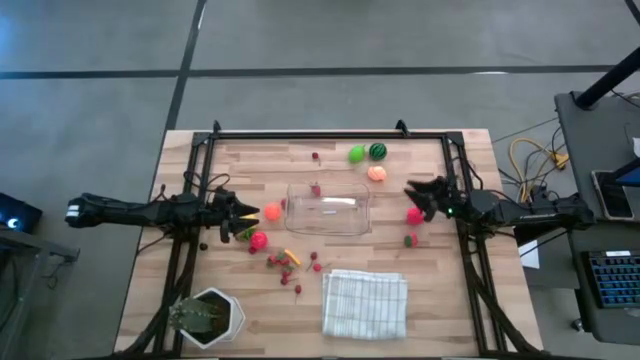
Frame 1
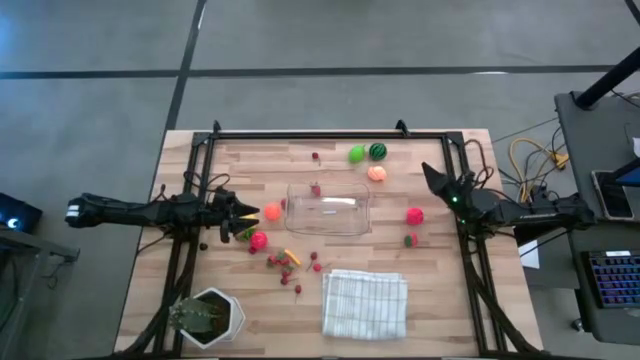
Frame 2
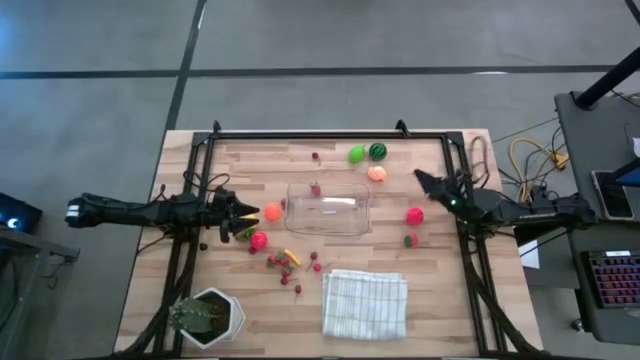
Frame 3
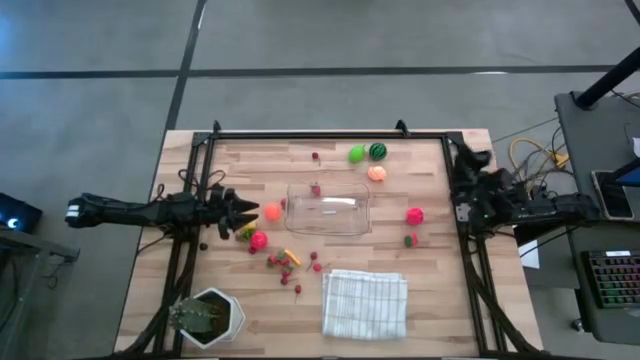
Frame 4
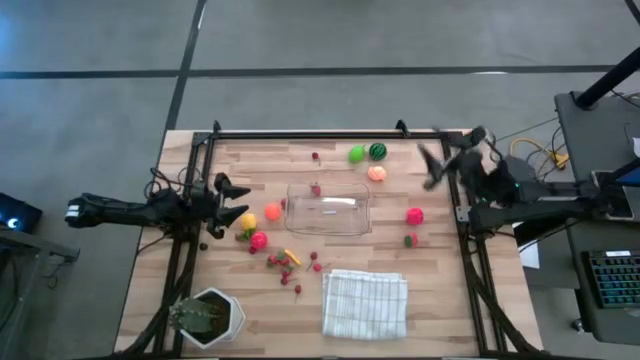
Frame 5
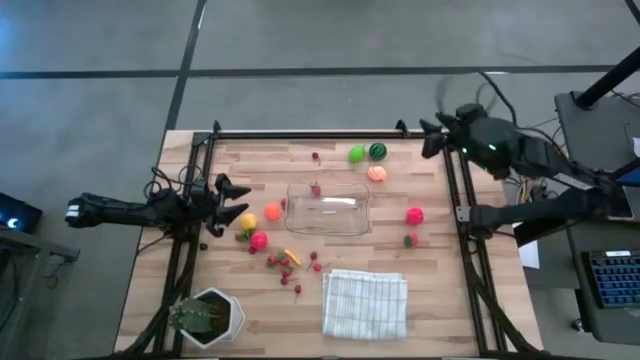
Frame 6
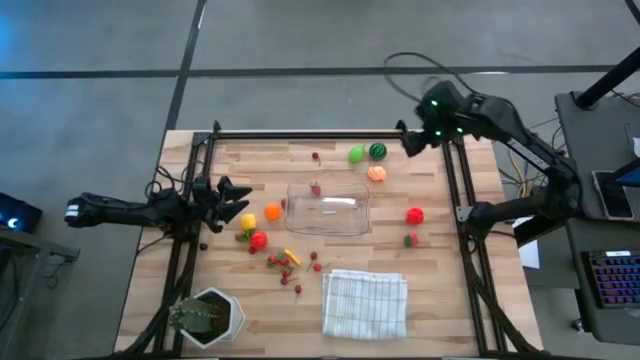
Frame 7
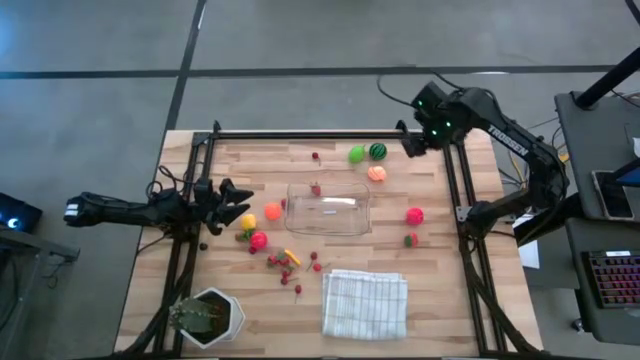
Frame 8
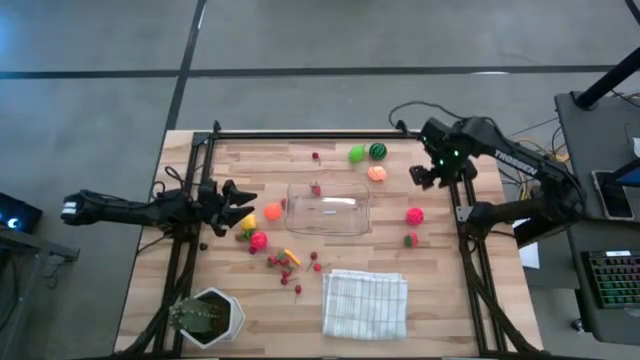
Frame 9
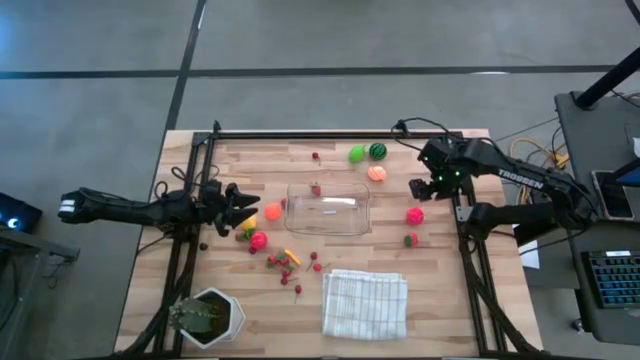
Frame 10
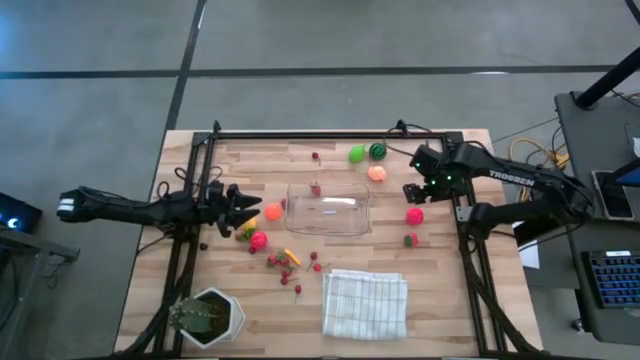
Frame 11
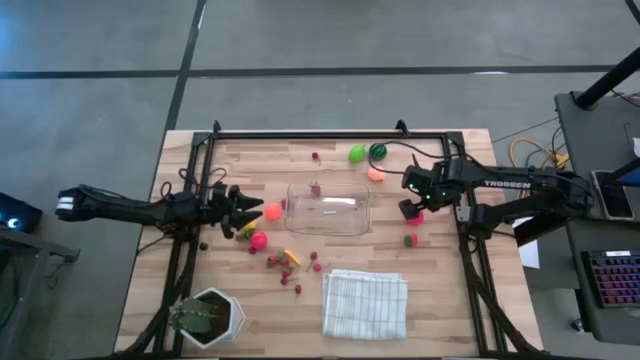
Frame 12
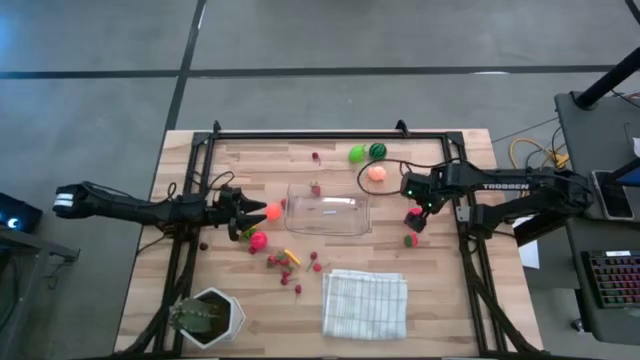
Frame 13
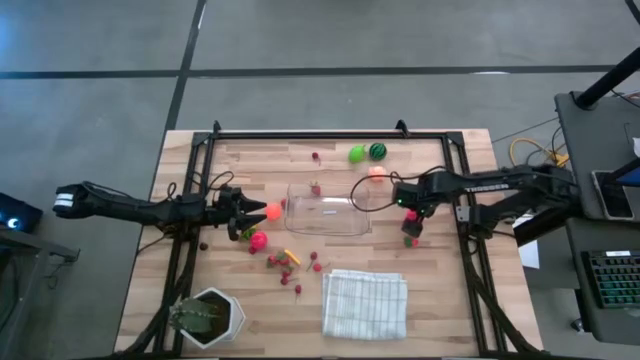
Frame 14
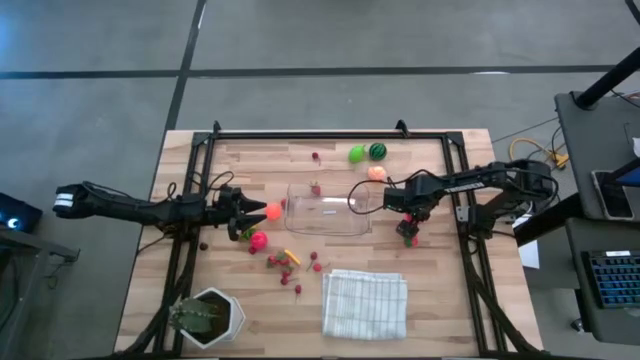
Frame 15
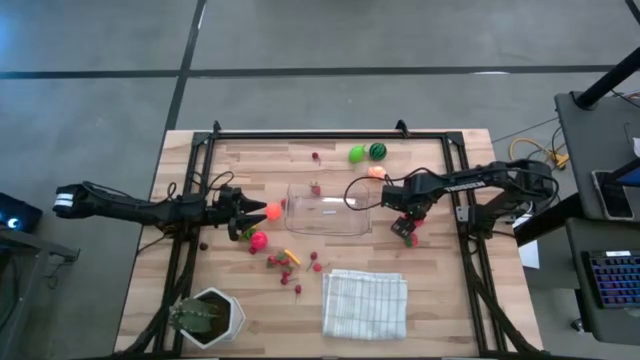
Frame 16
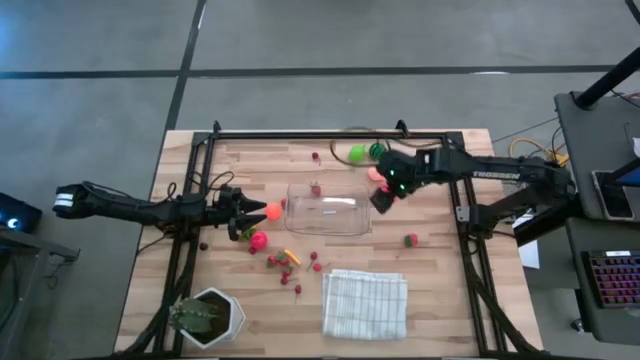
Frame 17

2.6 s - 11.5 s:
Task: Pick and placing Produce into tupperware
Put the red apple into the transparent bin

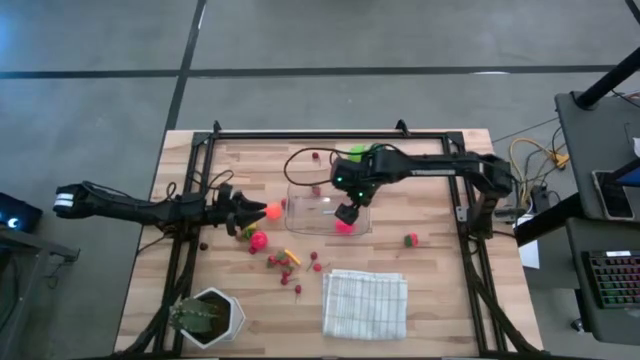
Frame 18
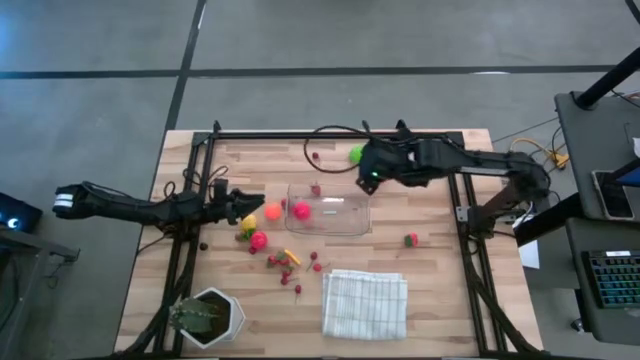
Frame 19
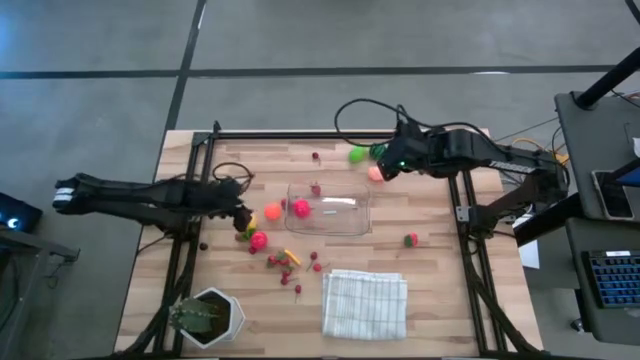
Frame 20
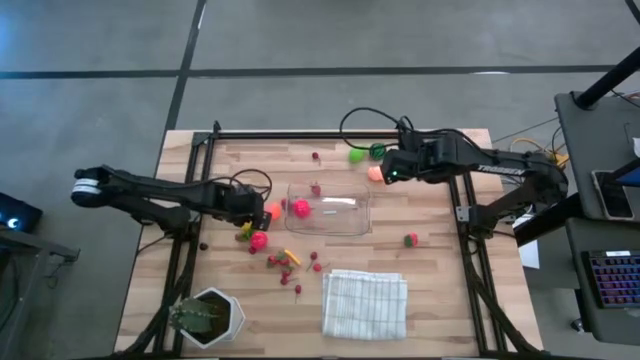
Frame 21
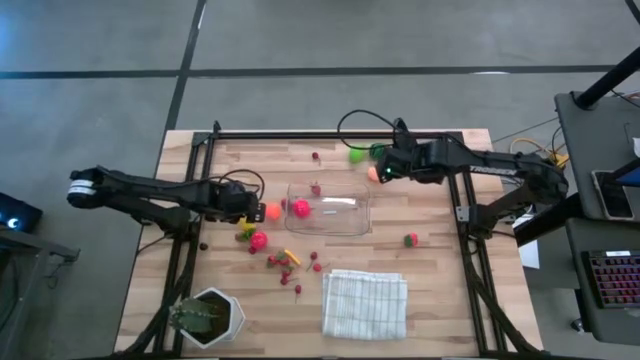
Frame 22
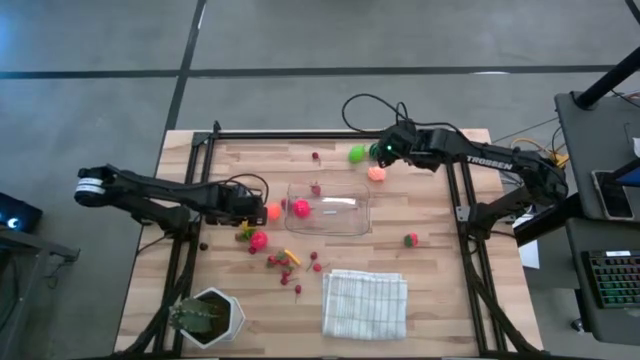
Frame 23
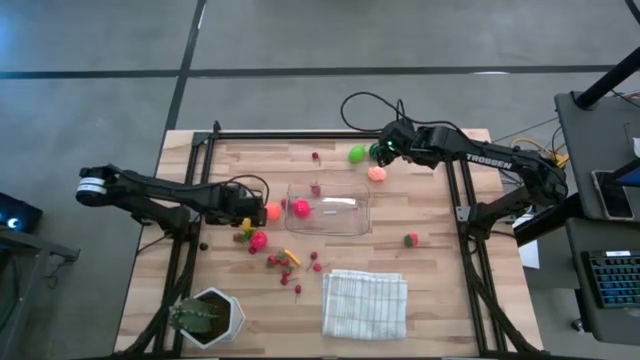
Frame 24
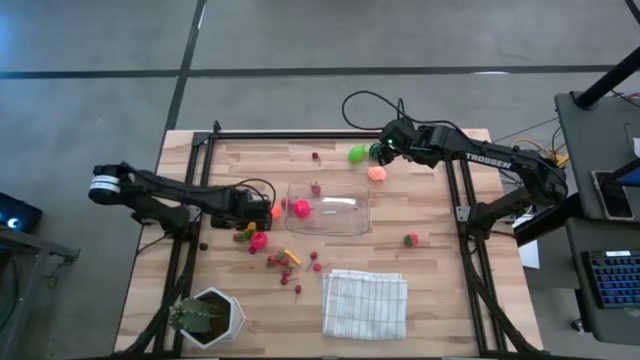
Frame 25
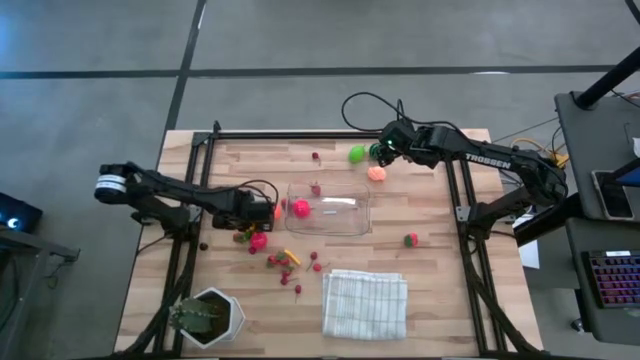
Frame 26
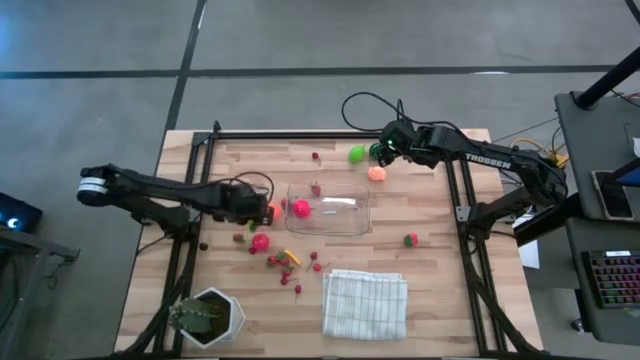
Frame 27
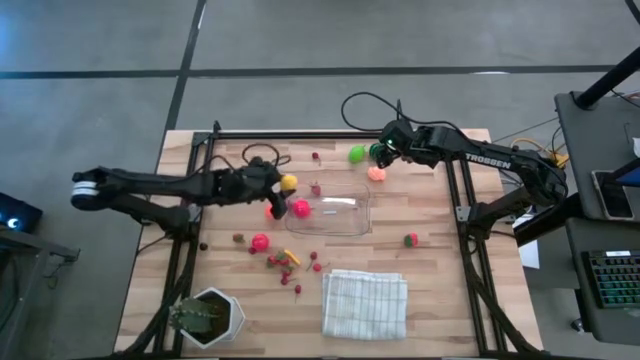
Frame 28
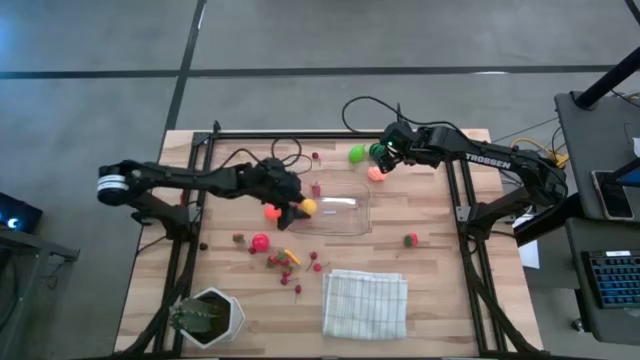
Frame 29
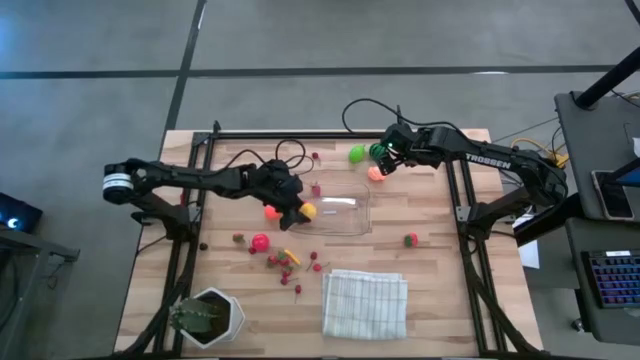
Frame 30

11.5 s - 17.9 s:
Put the yellow pineapple into the transparent bin

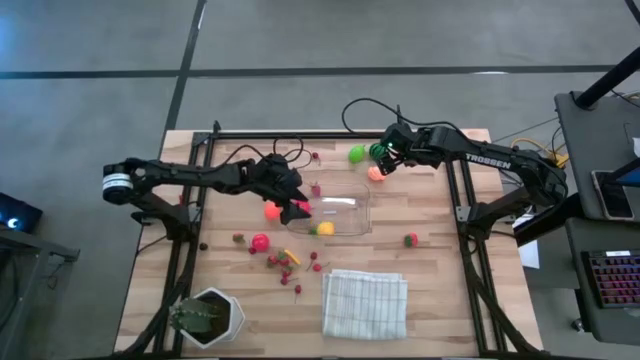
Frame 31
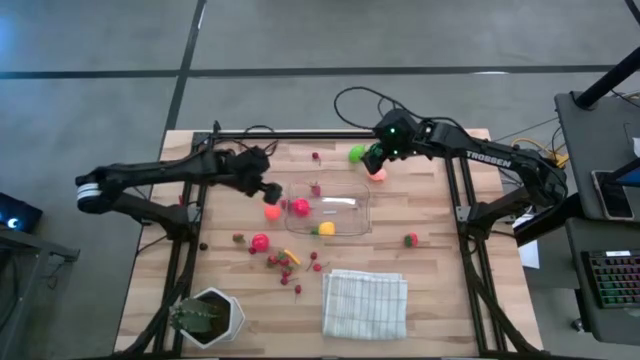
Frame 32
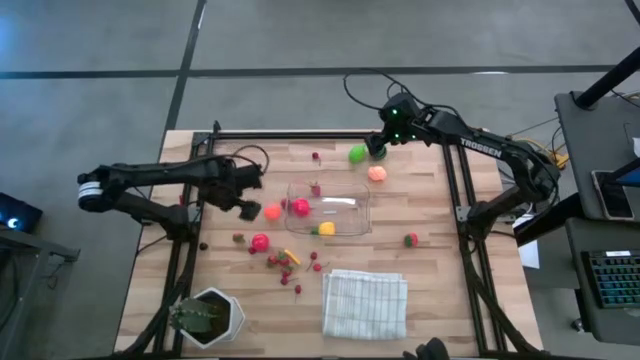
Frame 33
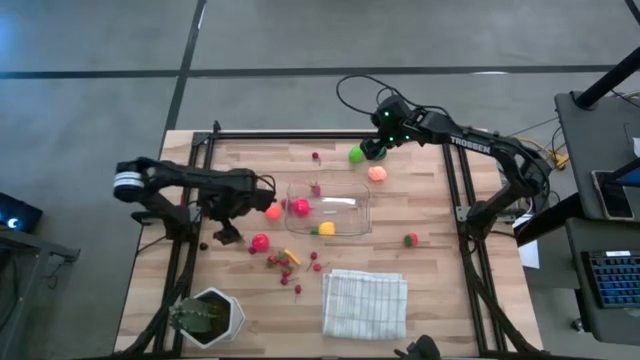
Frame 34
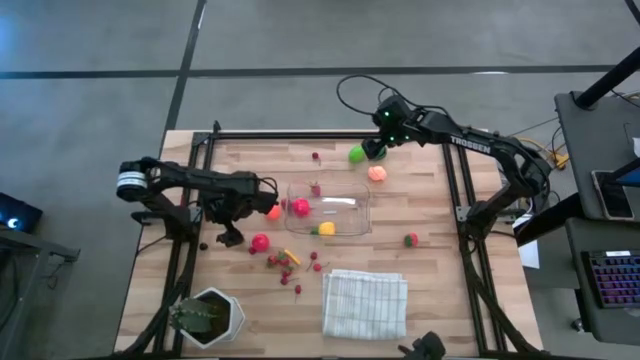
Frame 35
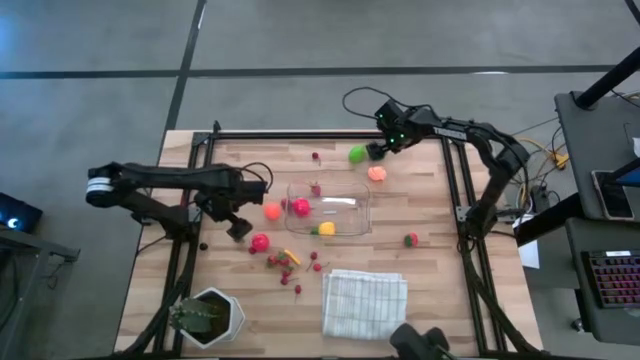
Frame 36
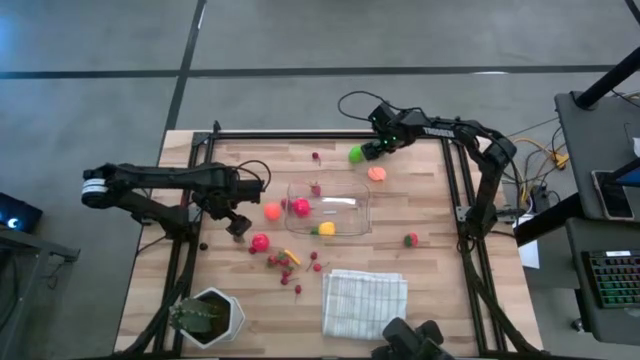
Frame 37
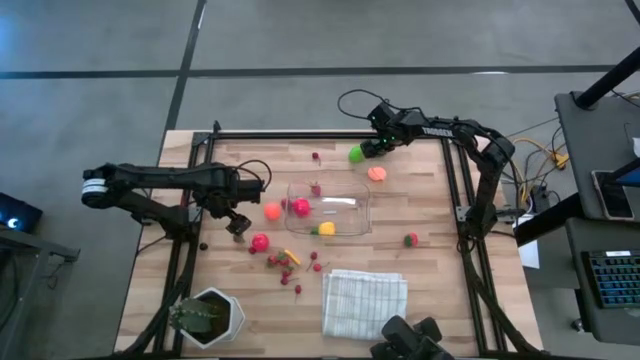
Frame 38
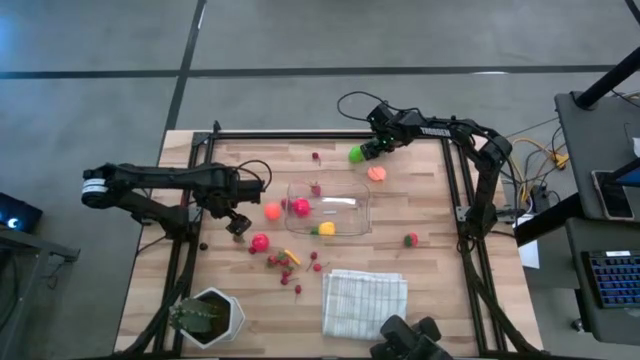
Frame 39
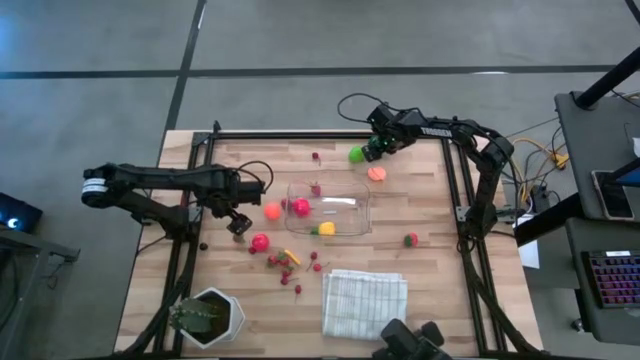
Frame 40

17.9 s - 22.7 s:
Put the green watermelon into the transparent bin

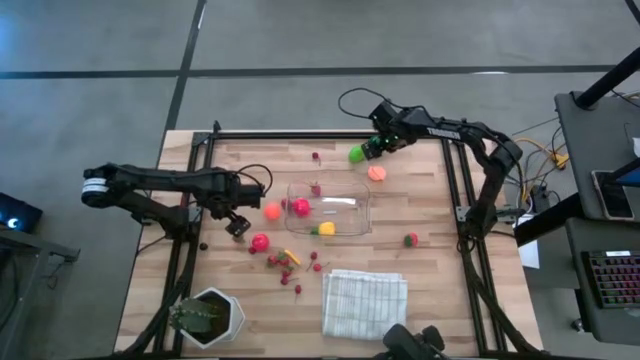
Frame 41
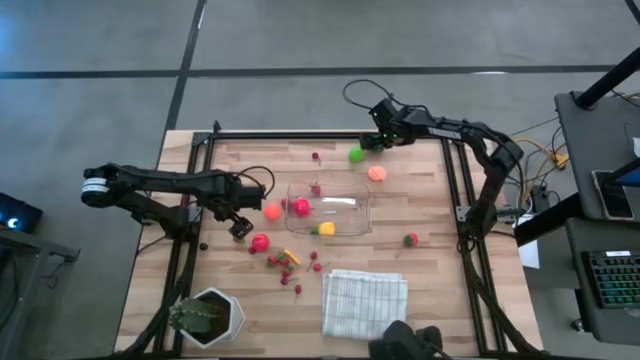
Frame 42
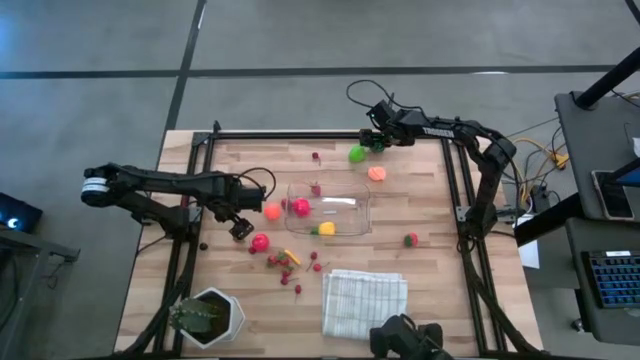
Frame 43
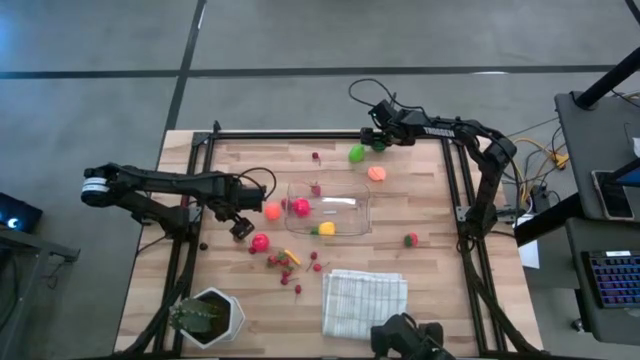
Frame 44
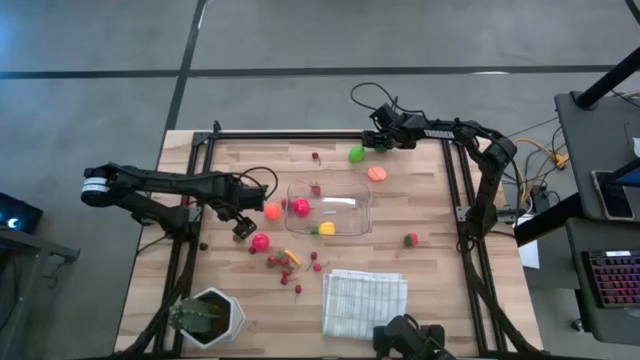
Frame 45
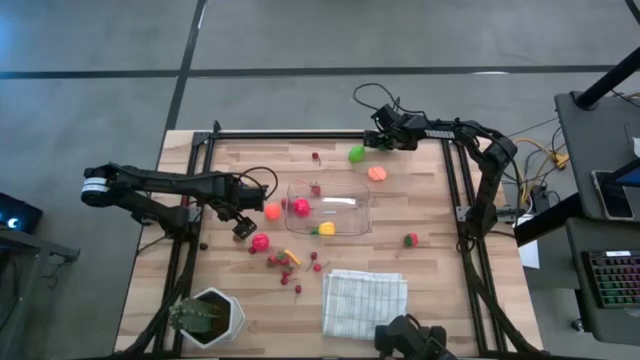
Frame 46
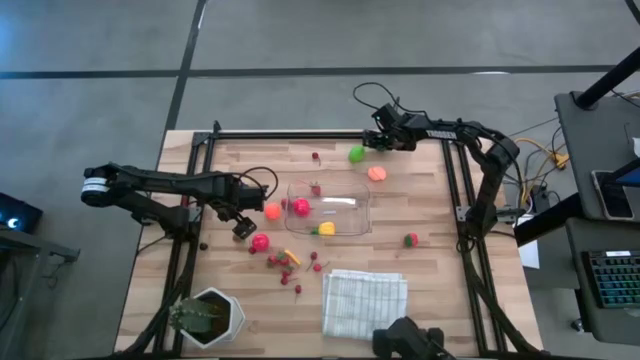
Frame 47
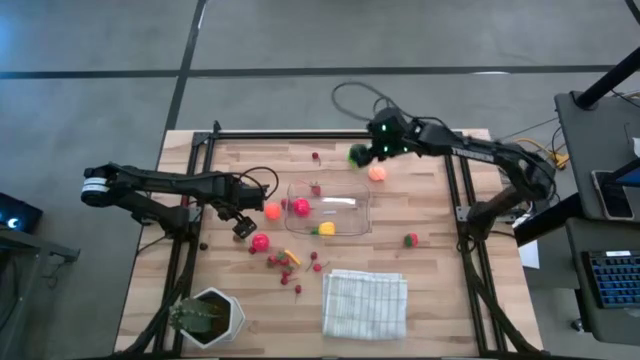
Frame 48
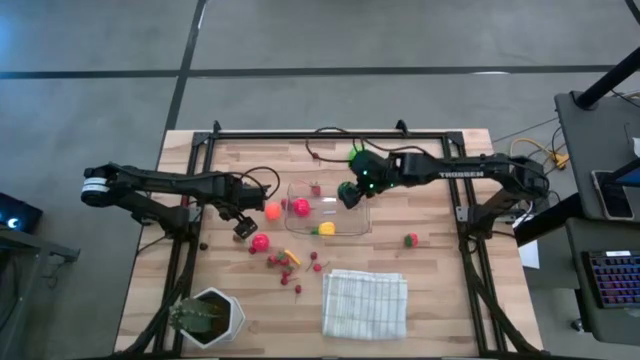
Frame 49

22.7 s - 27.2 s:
Put the green watermelon into the transparent bin
